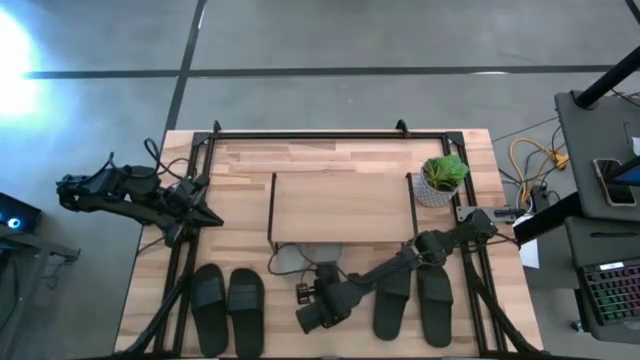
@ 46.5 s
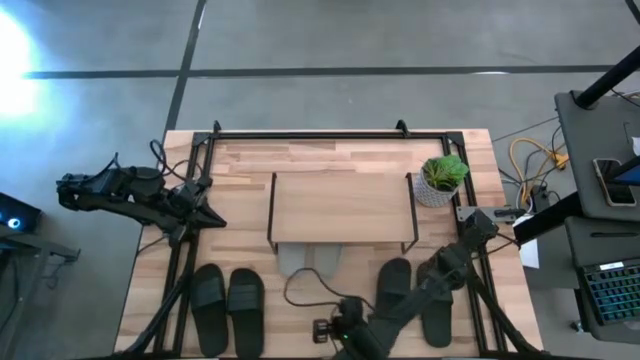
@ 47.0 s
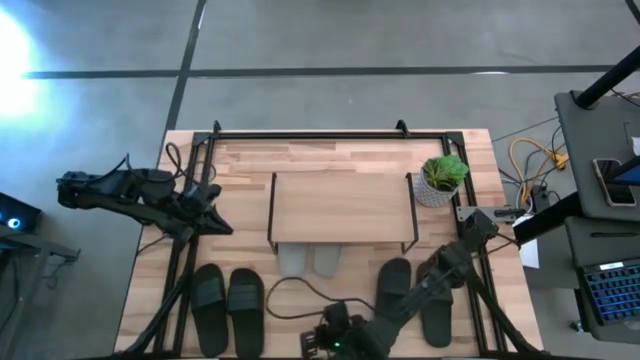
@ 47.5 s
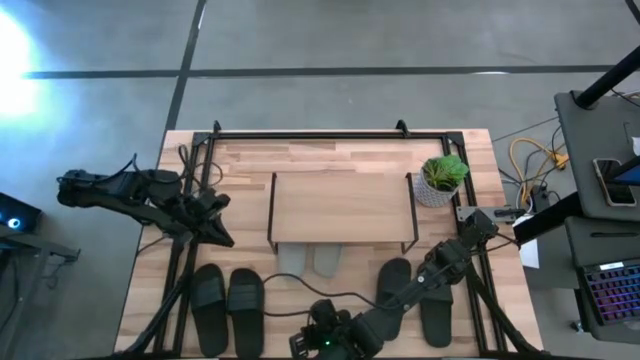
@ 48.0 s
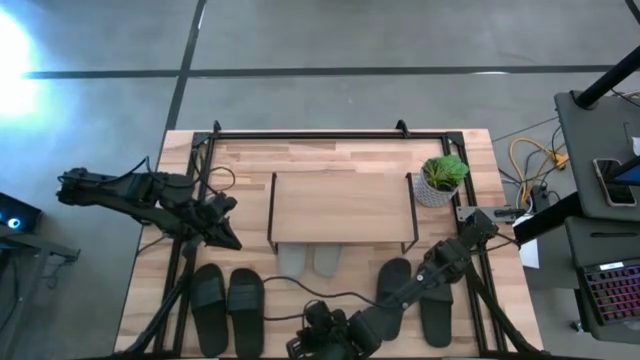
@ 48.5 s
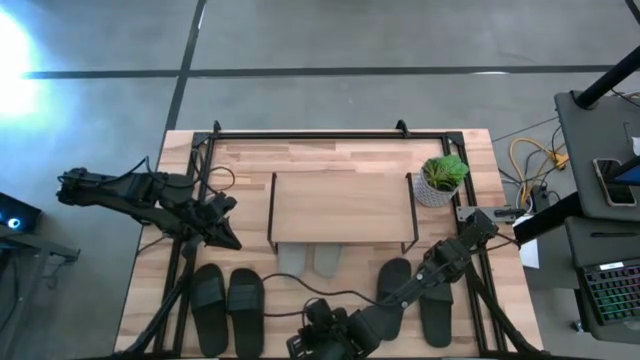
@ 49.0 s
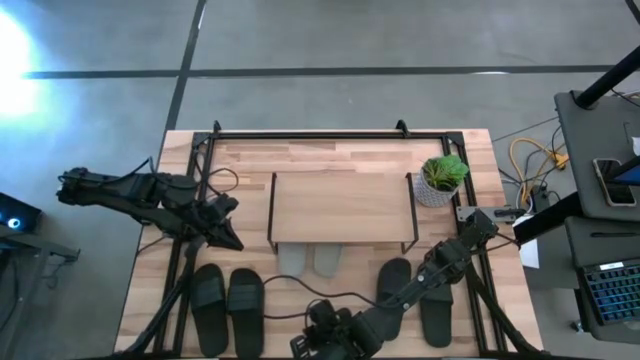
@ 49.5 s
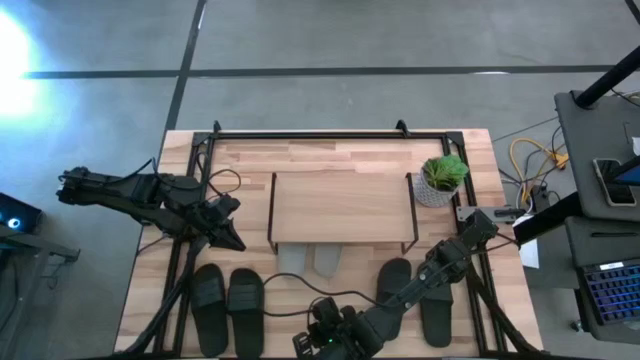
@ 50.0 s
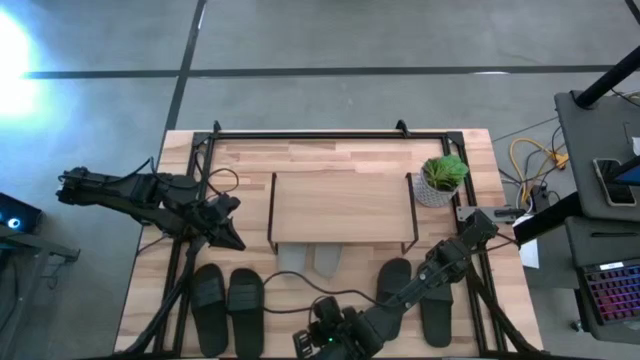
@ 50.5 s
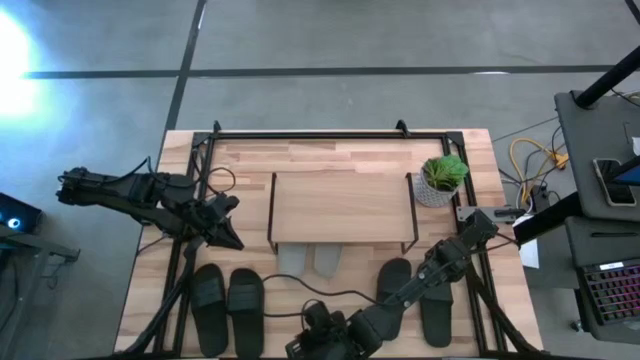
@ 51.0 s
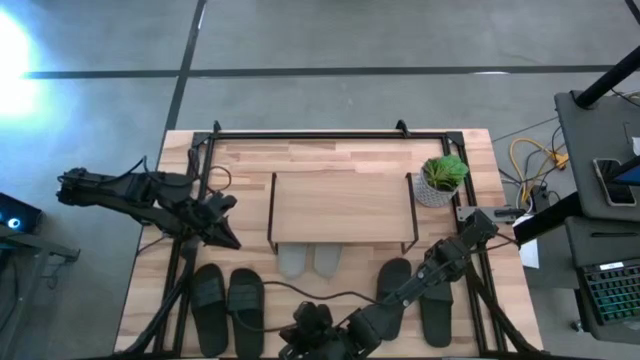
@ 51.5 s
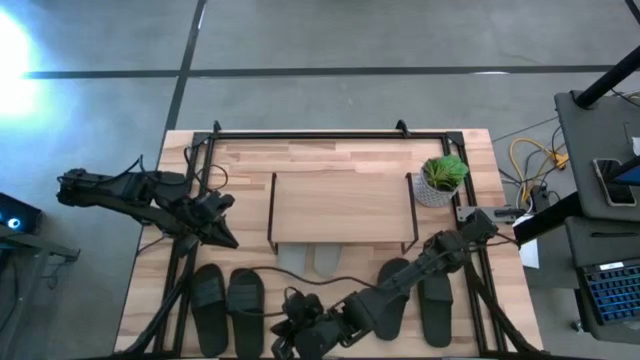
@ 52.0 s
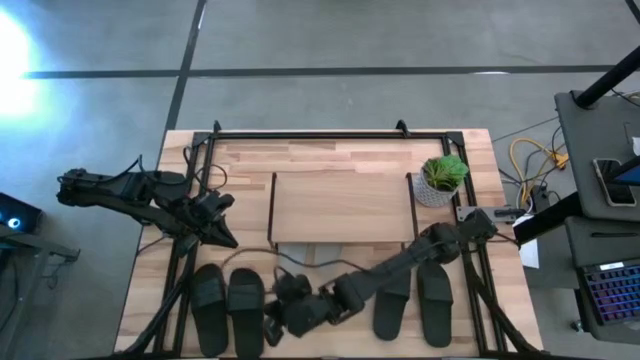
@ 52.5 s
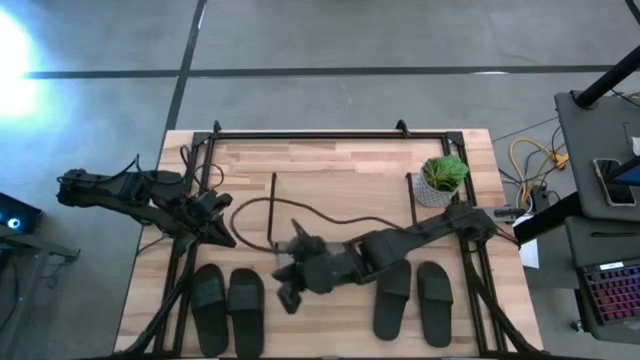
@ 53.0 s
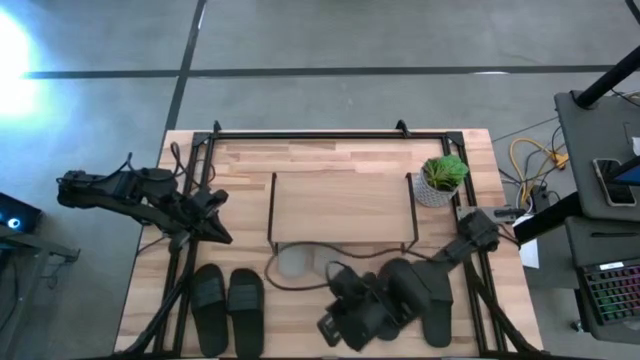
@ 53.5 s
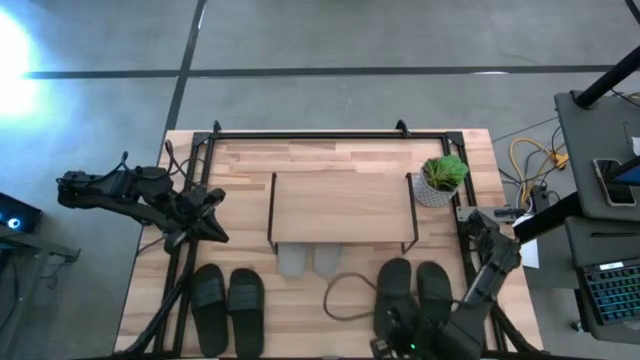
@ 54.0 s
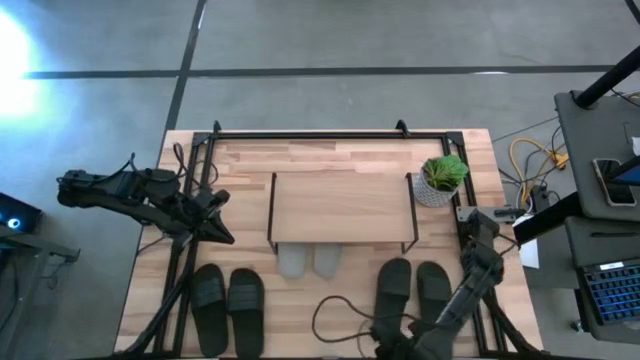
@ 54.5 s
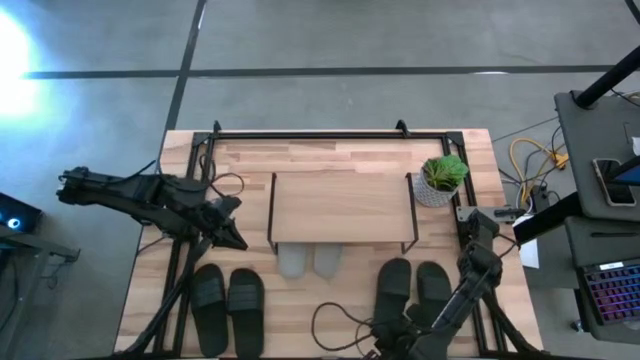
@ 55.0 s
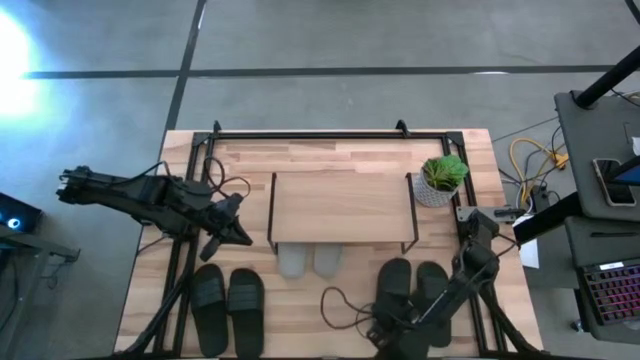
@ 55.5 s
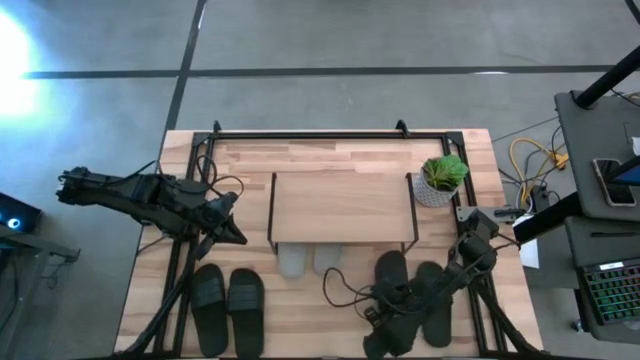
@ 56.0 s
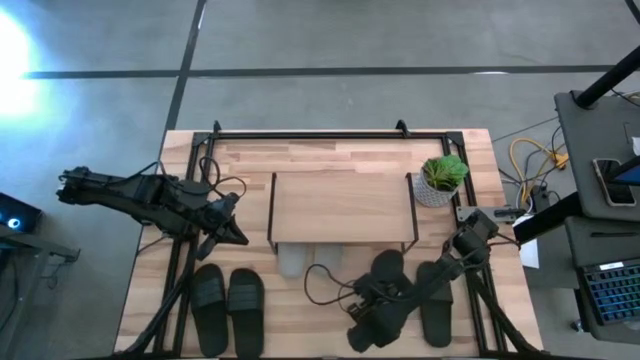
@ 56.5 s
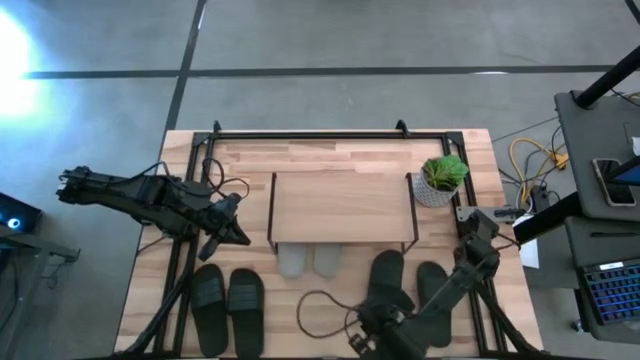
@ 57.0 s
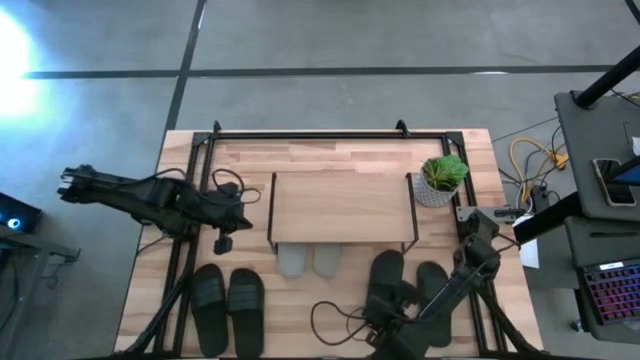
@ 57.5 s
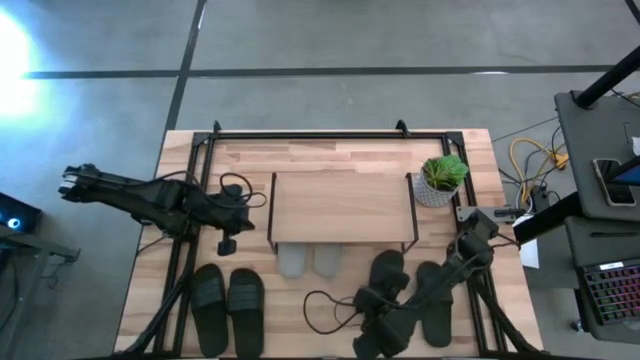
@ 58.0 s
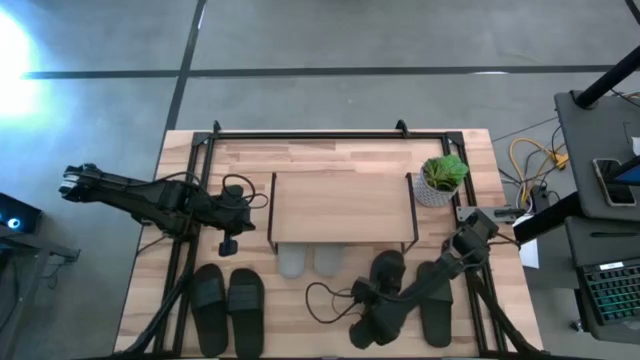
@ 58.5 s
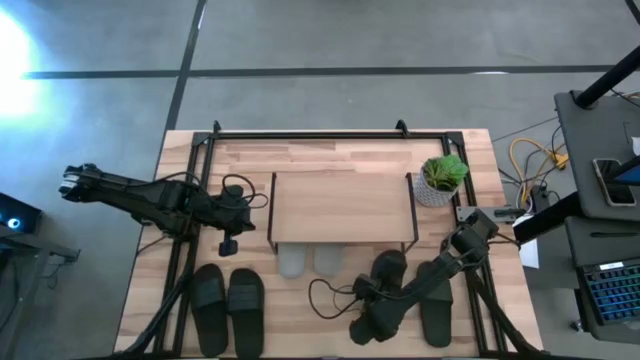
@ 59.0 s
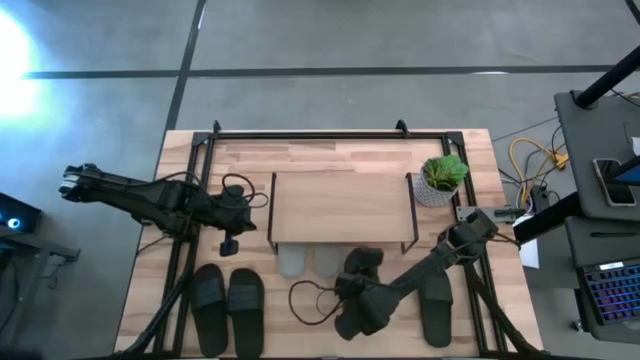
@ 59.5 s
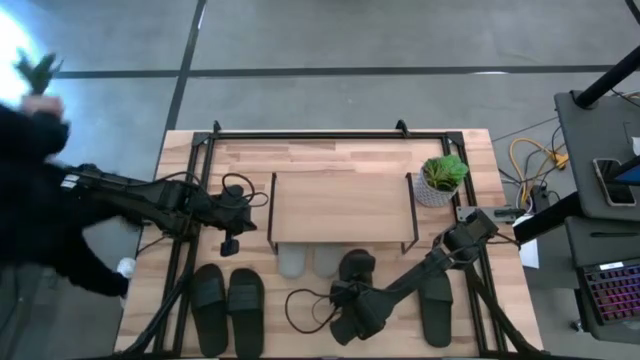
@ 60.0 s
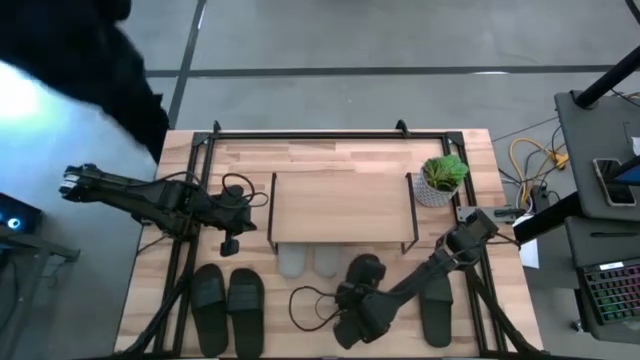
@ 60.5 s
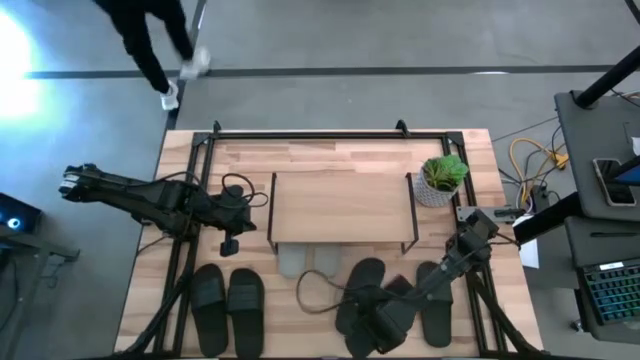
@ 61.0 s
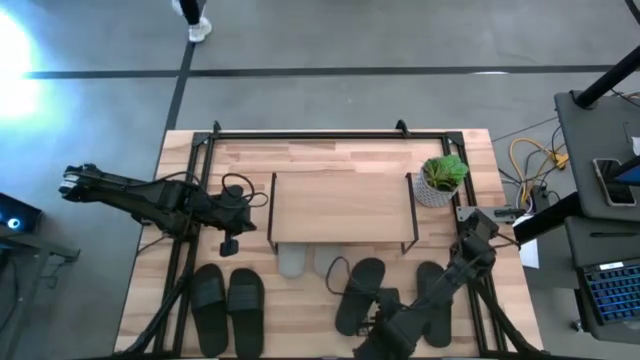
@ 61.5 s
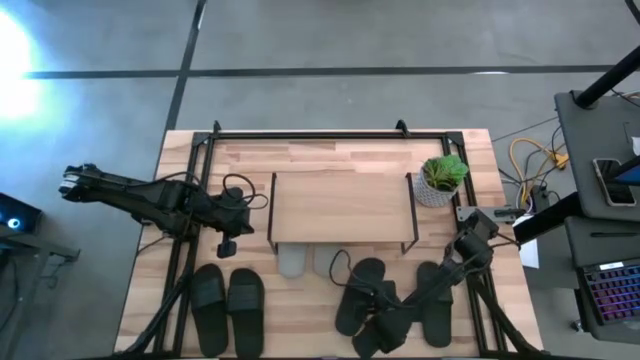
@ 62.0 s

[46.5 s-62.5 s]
Task: Pick and place slides into the shelf
Adjust the black slide near the shelf

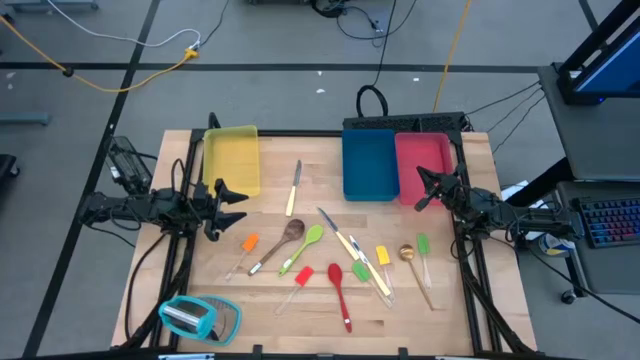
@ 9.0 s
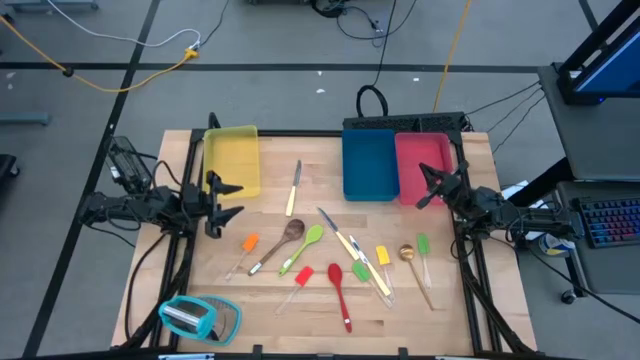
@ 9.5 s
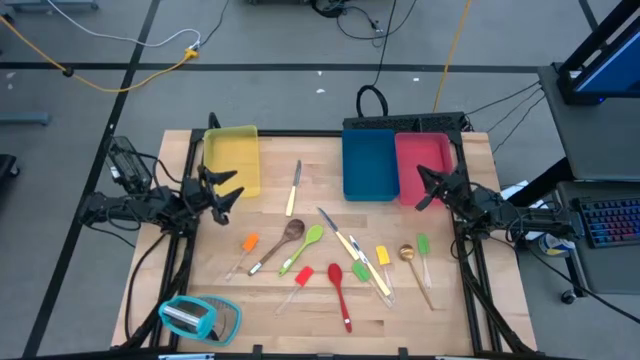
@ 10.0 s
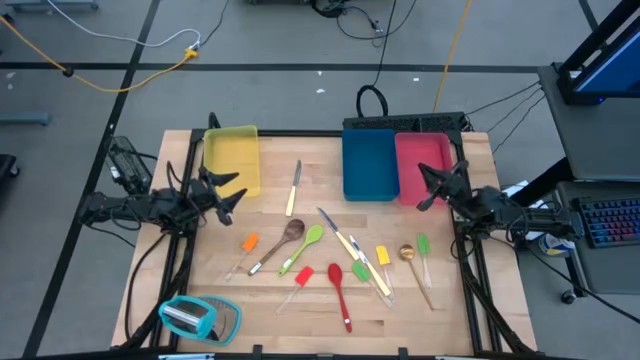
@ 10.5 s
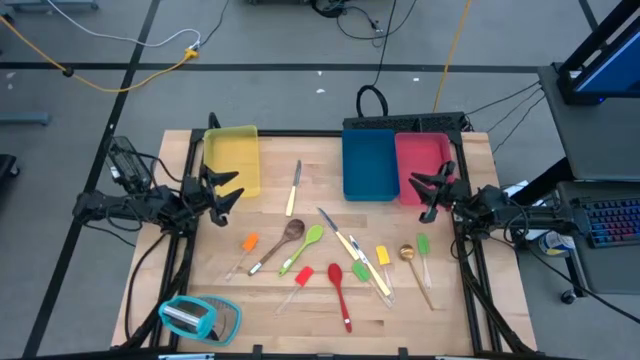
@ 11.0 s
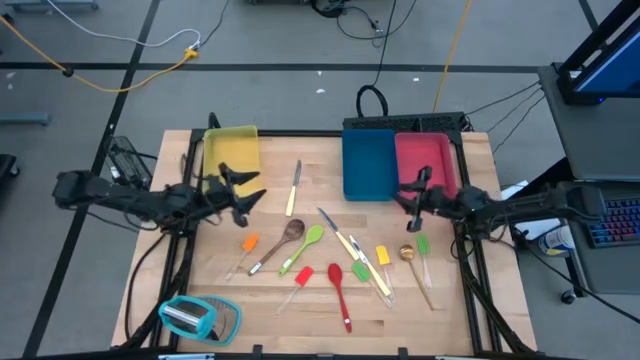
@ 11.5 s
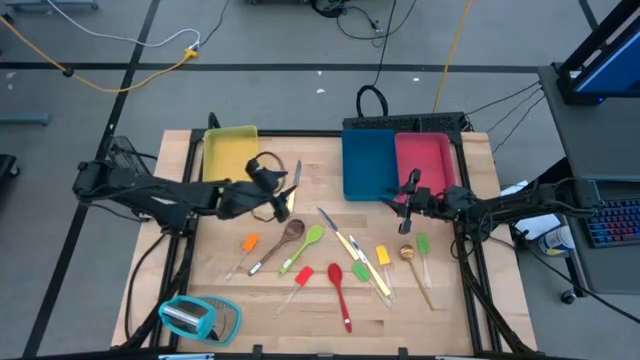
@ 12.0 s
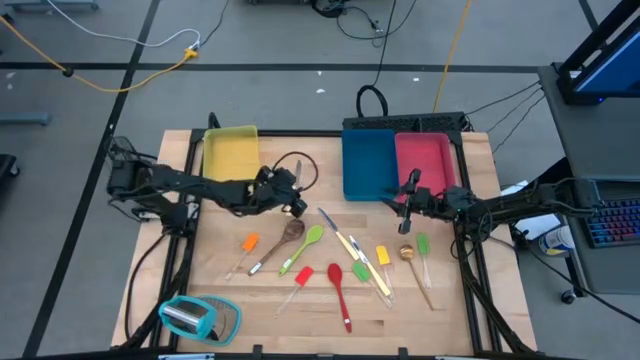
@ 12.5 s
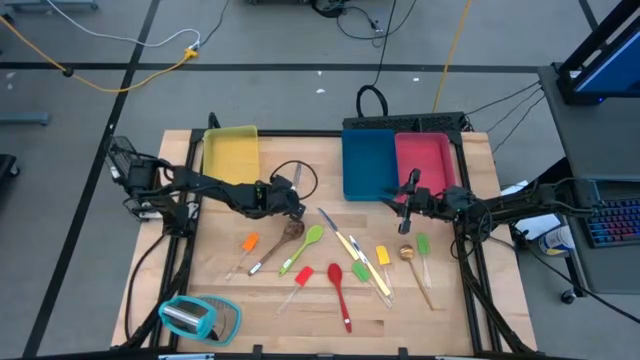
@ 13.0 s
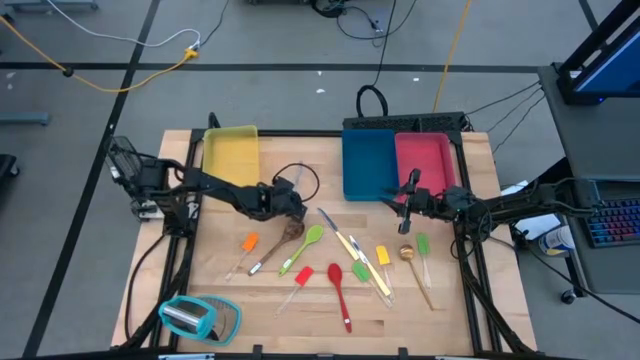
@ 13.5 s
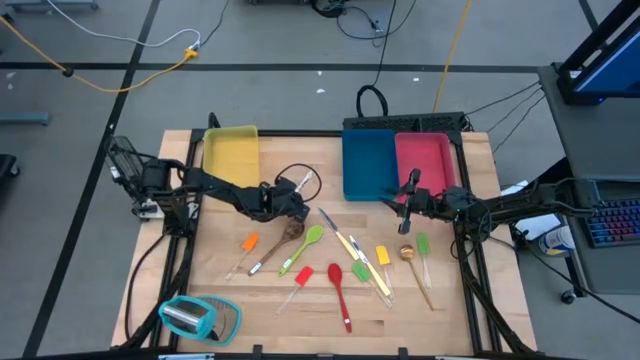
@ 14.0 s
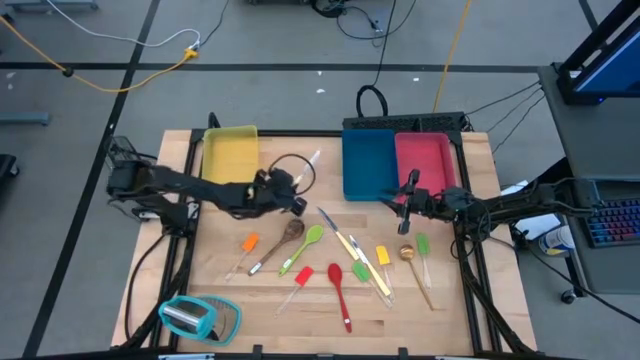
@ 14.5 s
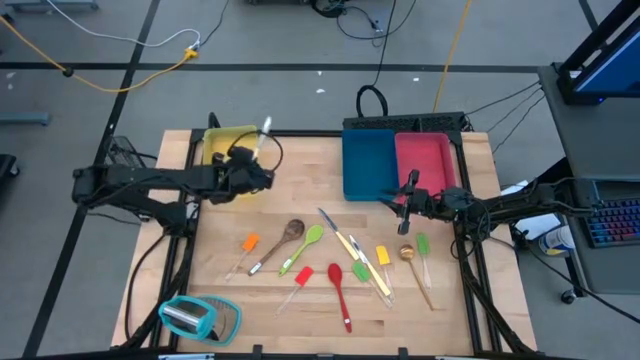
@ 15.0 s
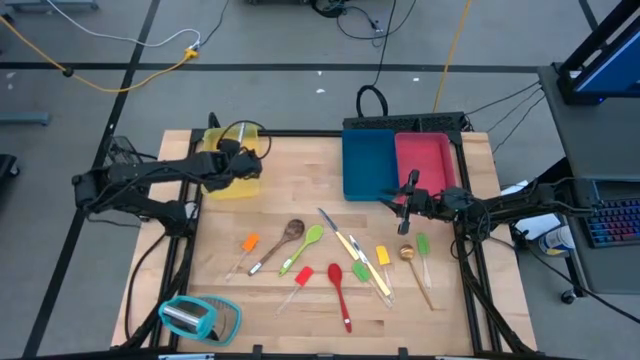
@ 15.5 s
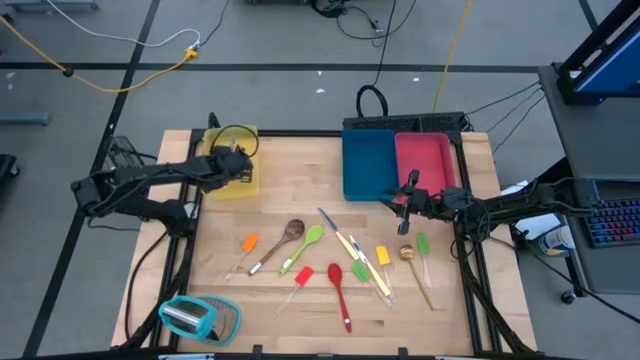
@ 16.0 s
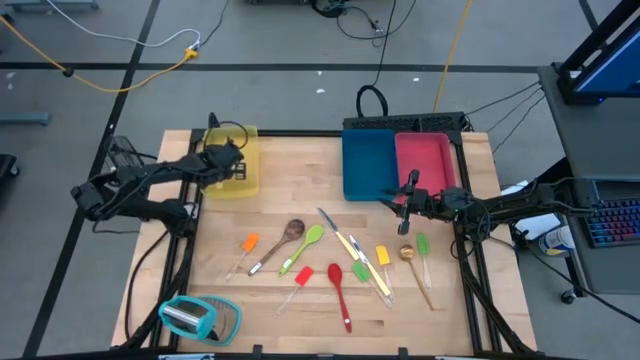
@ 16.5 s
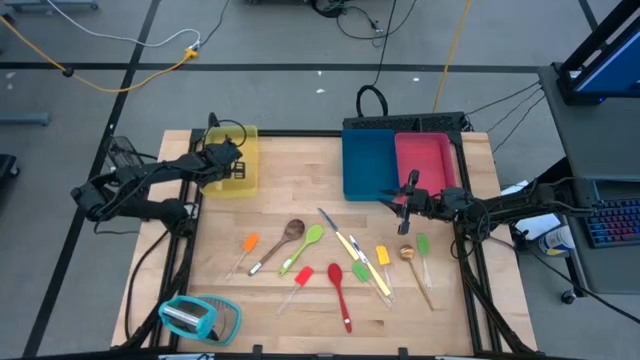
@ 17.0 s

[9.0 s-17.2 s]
Task: Pick & Place Kitchen Items
Put the yellow knife into the yellow bin
